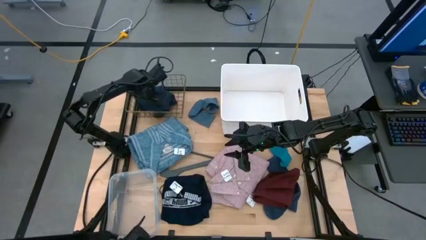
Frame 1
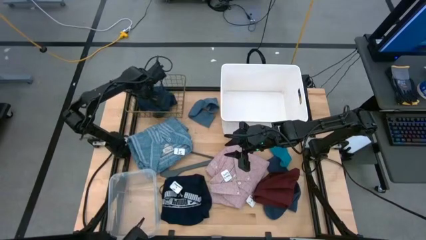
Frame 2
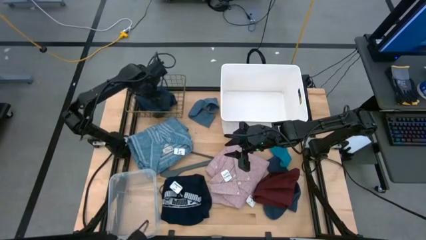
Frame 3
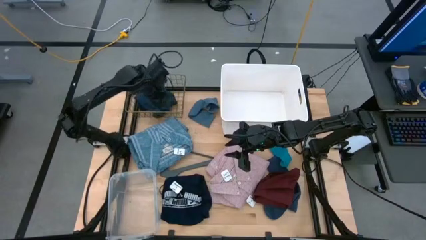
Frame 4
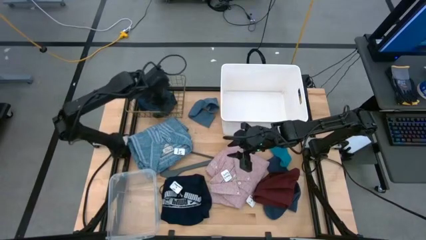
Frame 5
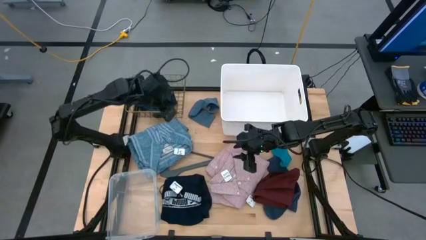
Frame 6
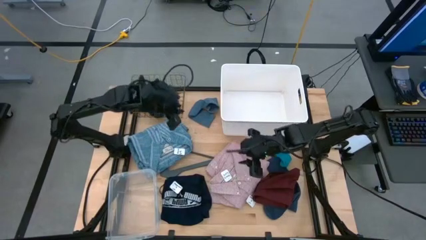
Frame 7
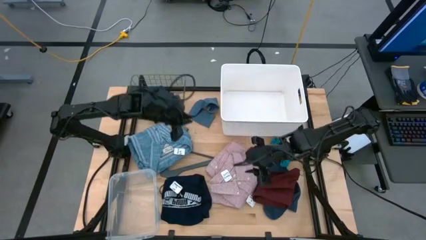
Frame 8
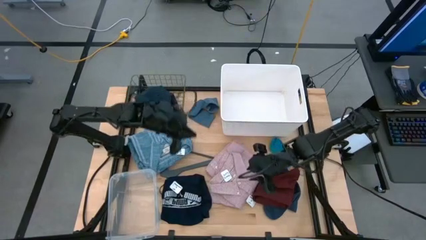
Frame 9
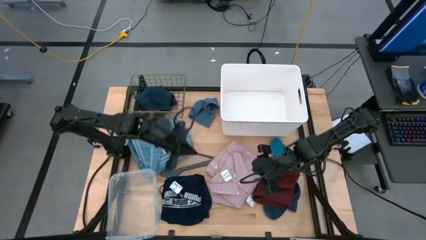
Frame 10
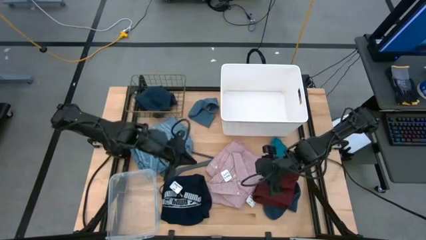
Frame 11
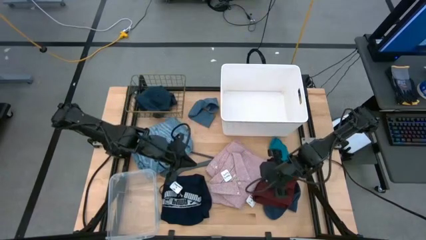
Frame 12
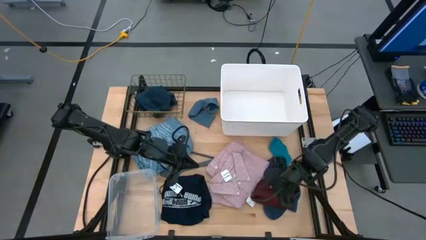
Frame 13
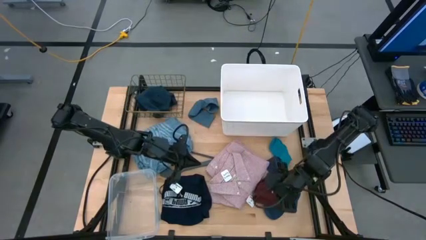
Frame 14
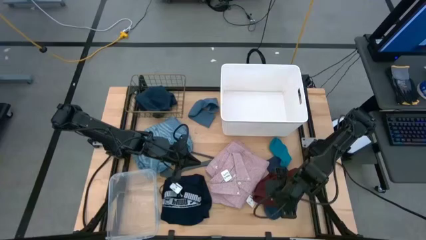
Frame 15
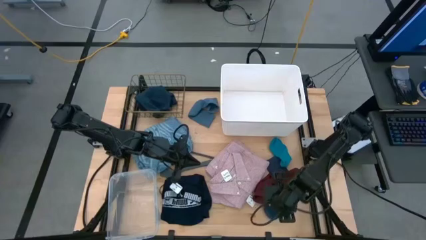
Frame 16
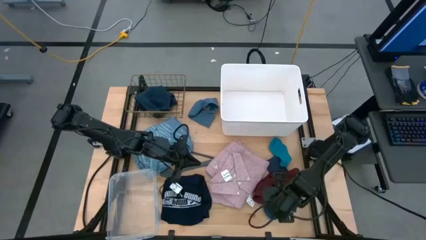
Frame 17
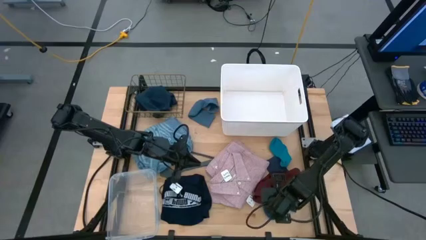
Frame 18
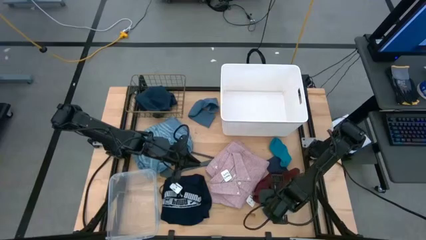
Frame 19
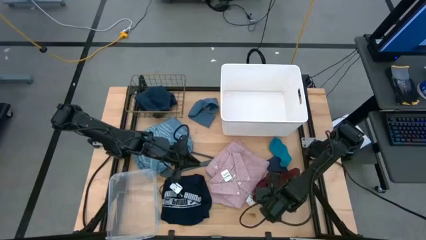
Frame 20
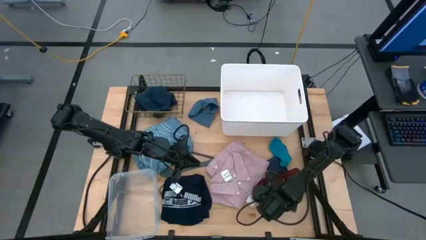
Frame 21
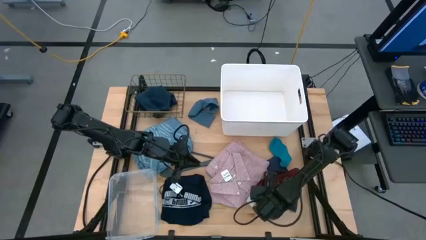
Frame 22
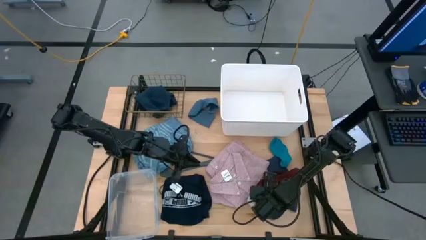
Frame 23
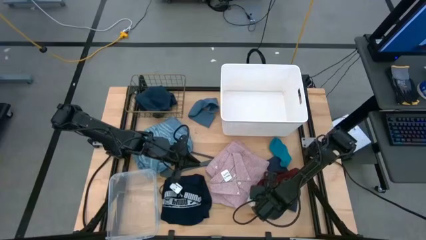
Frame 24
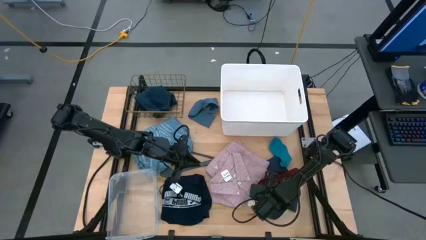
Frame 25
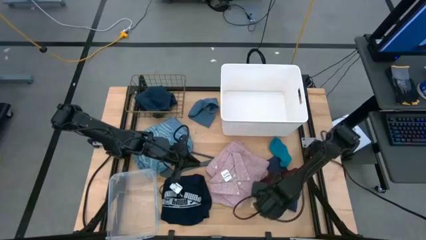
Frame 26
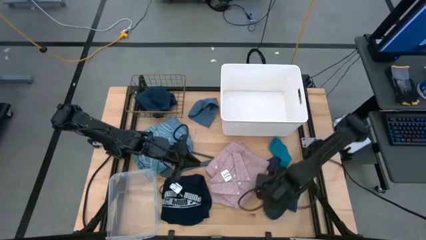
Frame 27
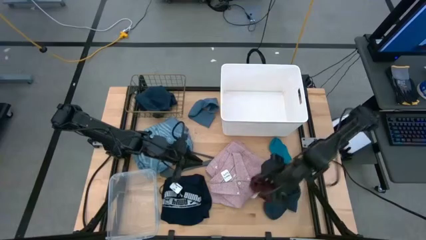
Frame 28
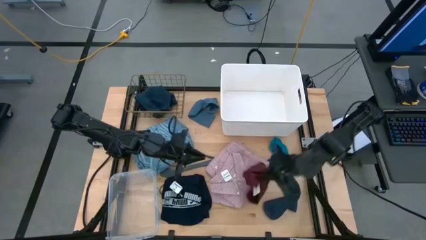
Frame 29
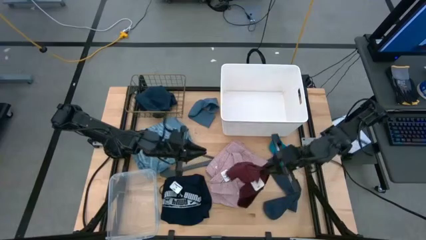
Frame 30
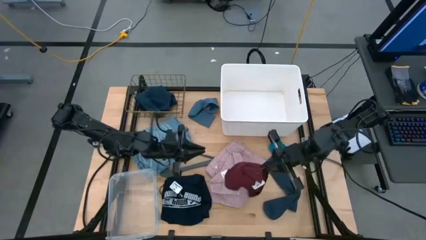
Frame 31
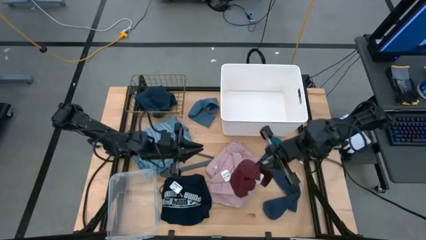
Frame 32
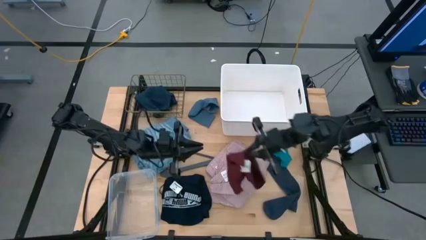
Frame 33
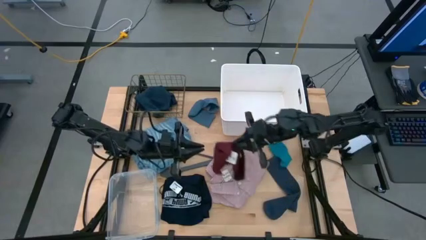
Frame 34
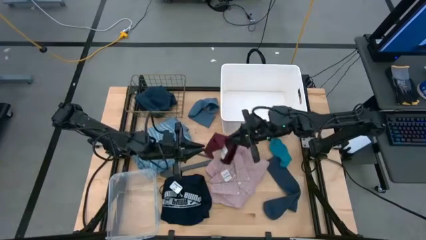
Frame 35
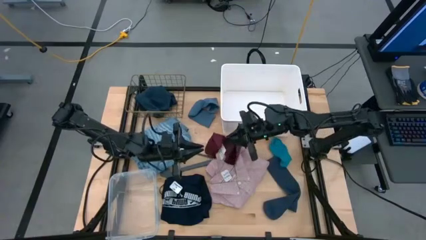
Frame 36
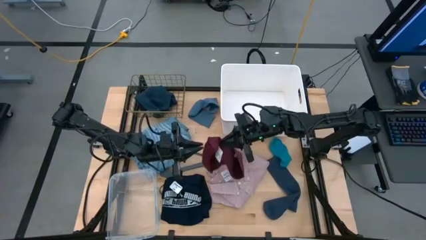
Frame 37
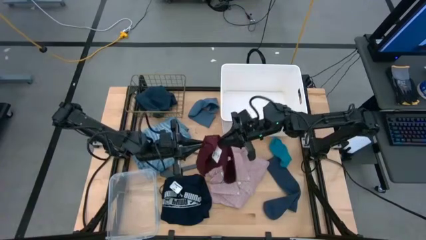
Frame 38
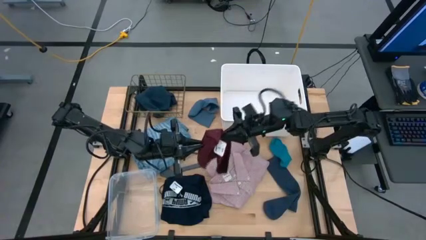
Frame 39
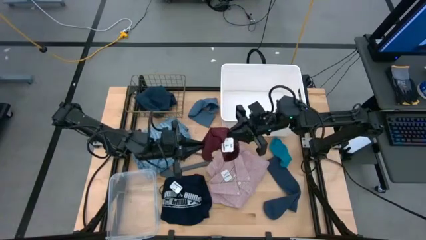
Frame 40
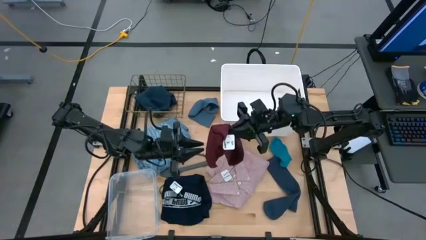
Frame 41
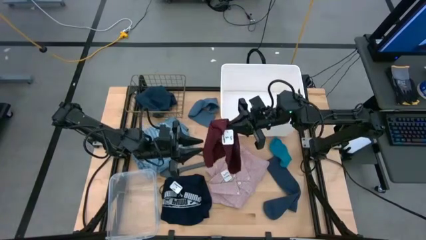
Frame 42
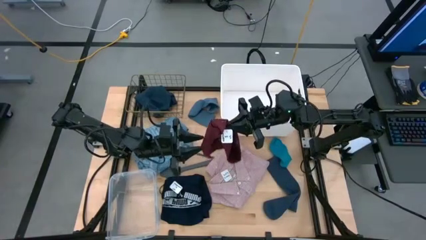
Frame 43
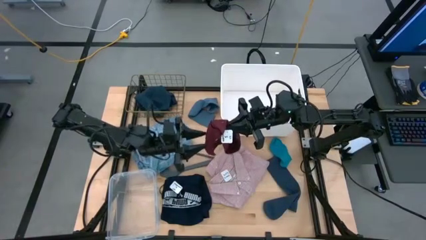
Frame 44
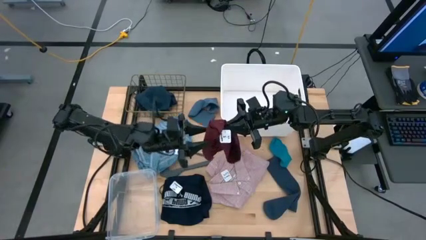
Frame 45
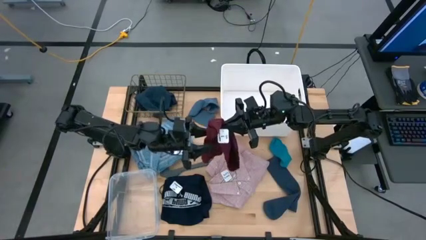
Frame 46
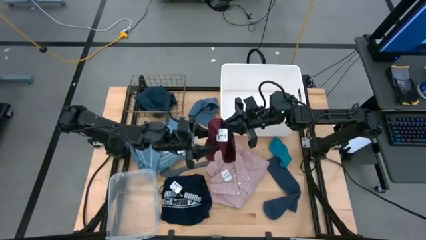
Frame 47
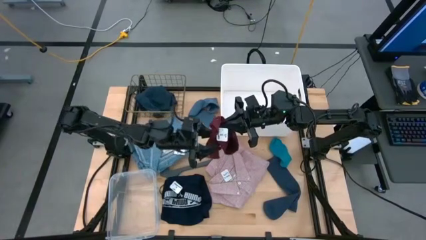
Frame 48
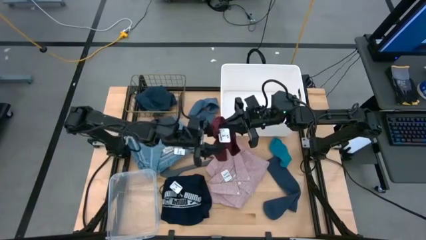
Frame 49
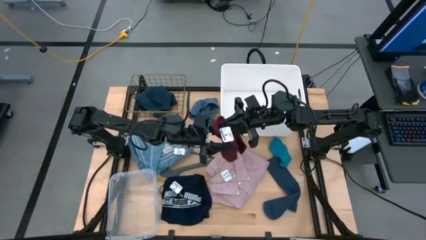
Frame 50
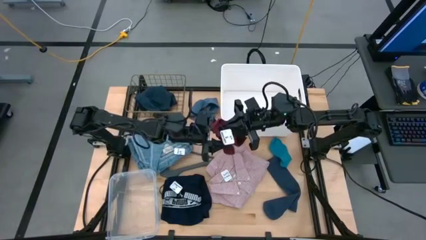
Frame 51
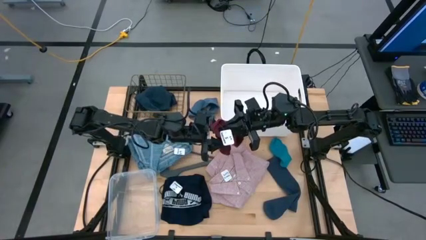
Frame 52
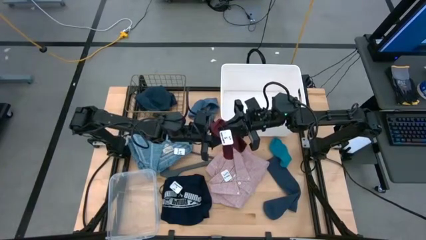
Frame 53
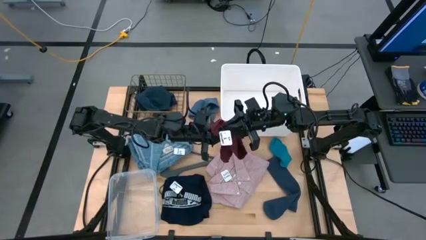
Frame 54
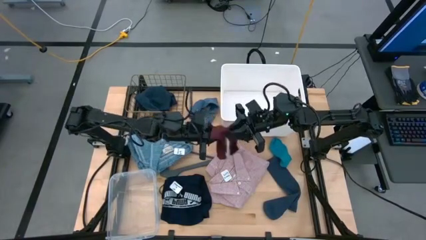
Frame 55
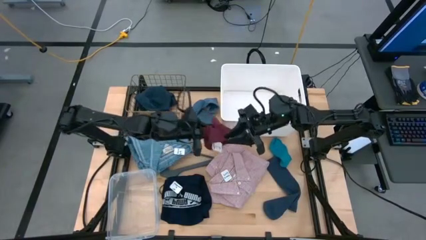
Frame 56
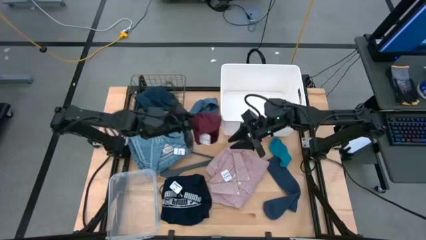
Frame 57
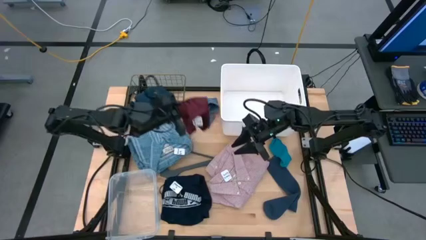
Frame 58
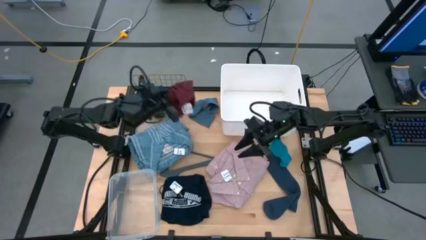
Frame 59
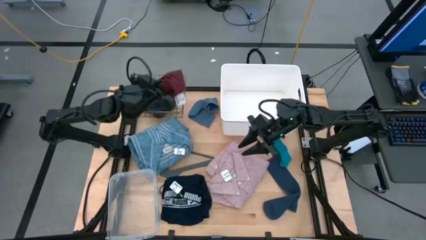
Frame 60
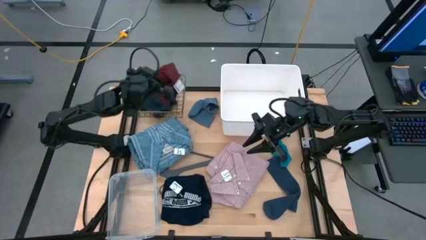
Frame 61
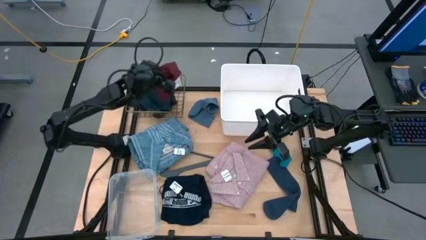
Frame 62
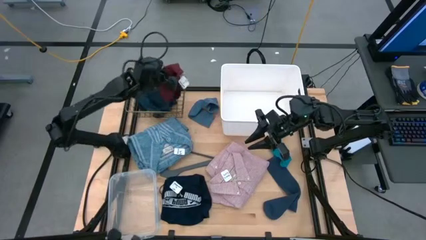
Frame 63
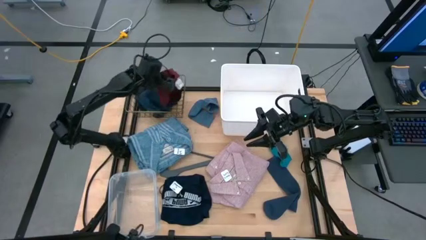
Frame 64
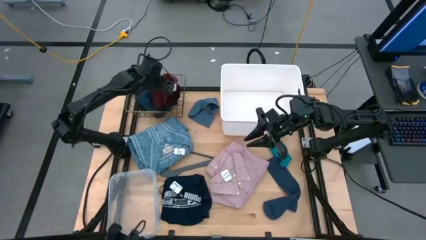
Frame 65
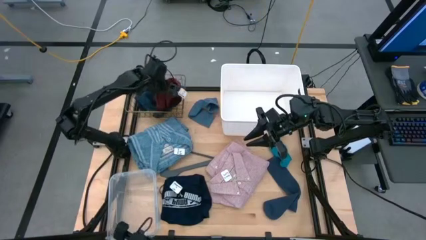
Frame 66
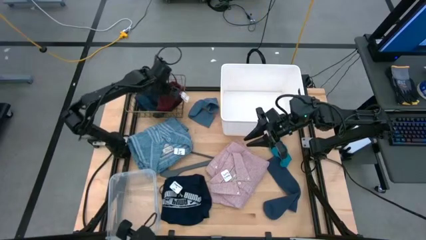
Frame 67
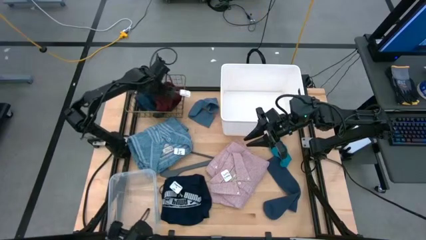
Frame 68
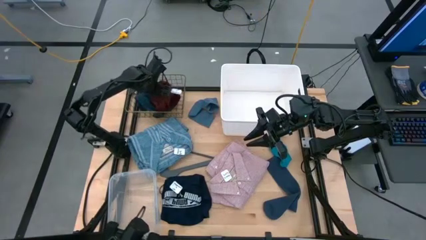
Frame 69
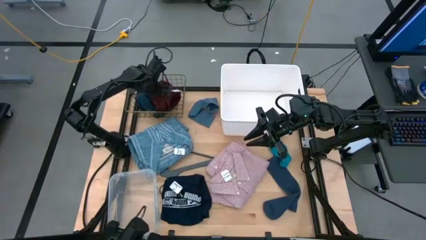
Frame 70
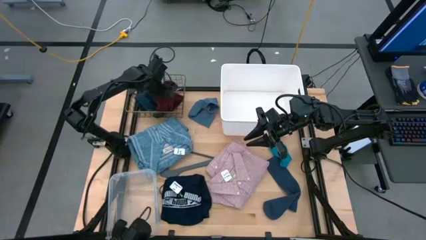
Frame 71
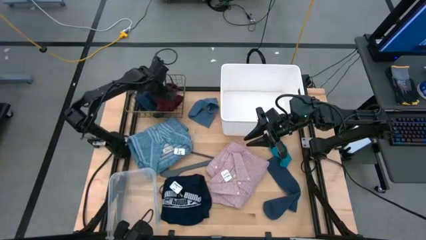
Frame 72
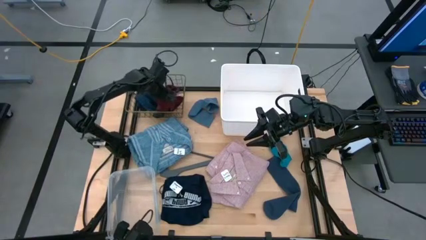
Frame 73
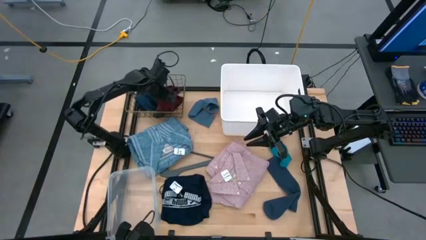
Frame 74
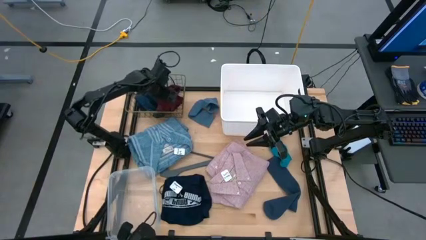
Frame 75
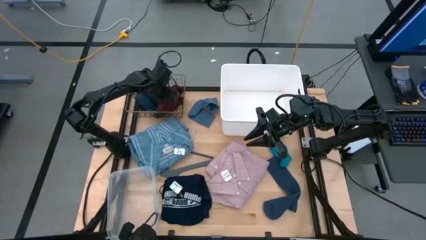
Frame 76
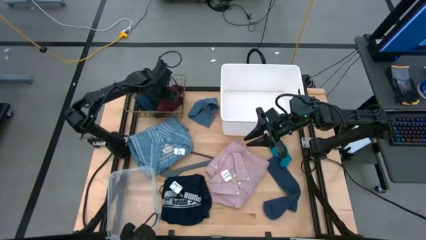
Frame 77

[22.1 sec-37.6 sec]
Task: Pick & Place Cloths
Put the red underwear into the black basket
